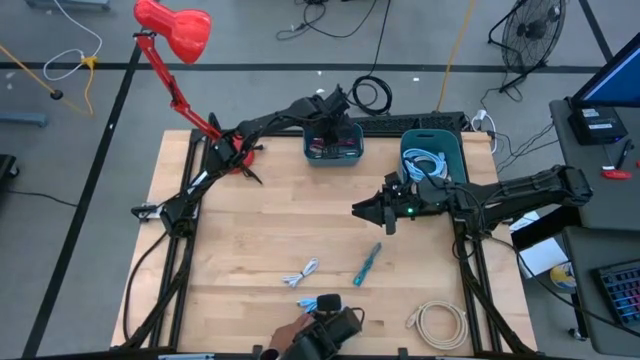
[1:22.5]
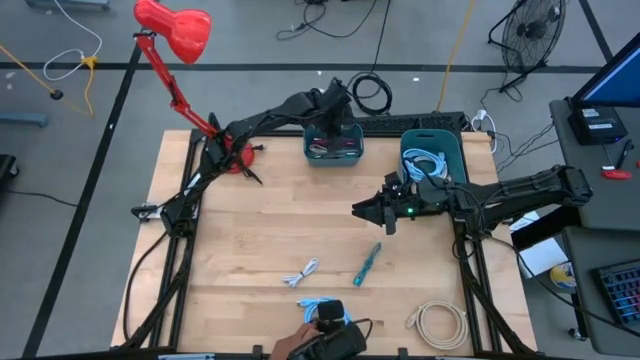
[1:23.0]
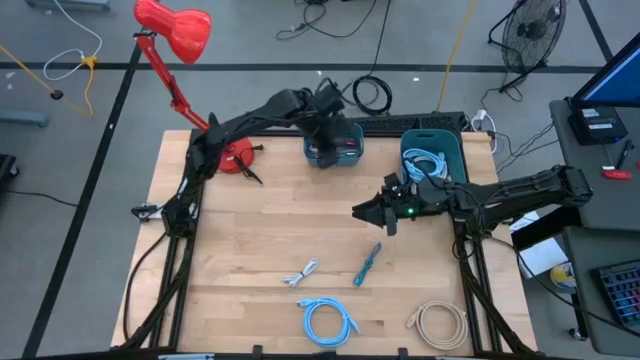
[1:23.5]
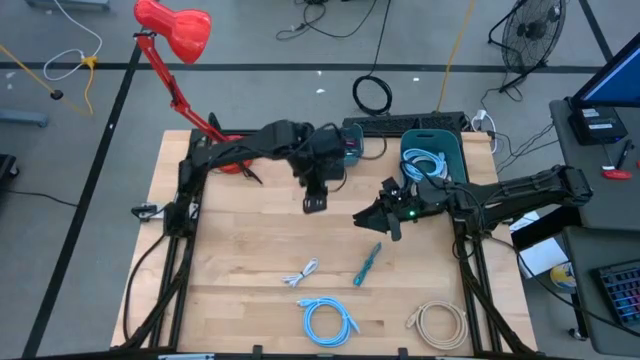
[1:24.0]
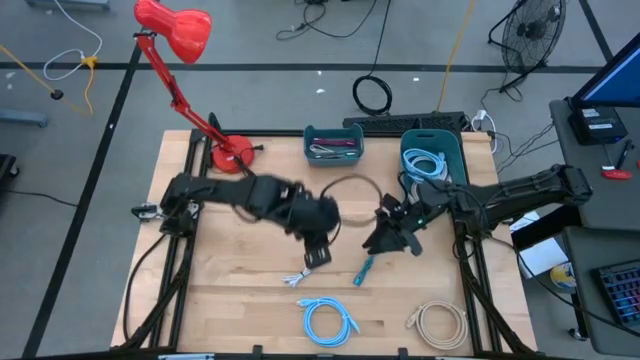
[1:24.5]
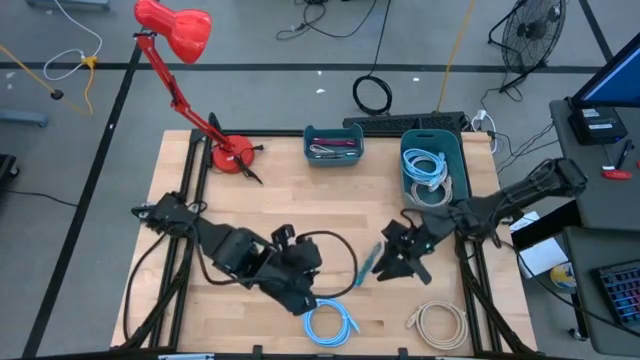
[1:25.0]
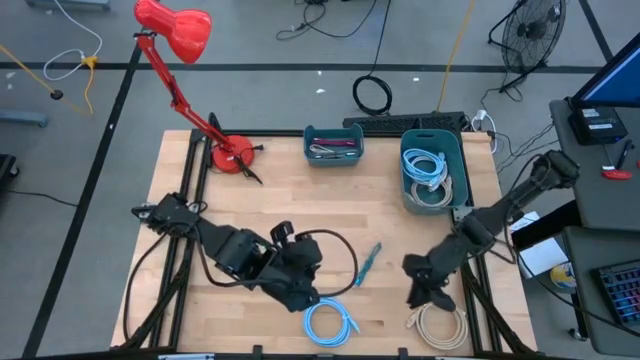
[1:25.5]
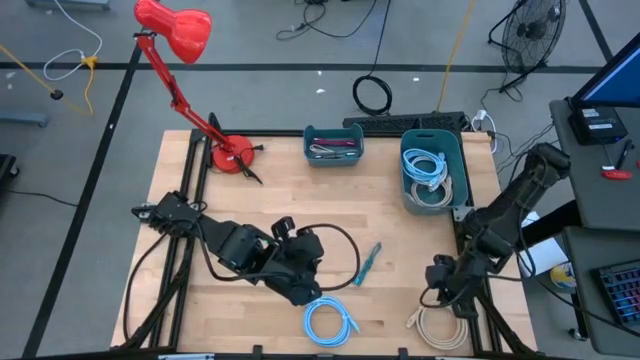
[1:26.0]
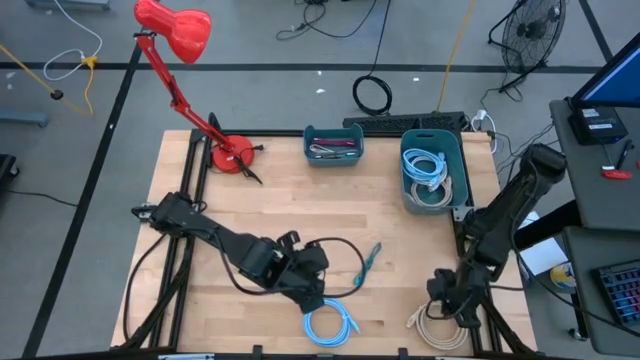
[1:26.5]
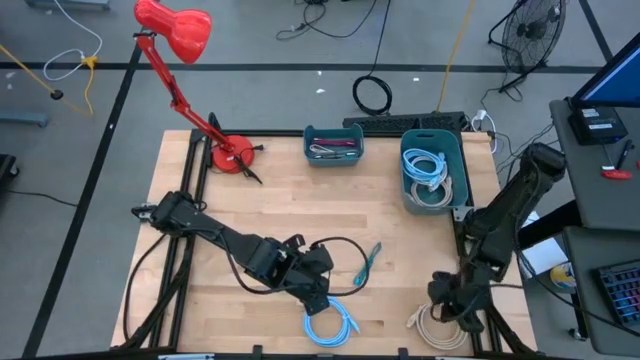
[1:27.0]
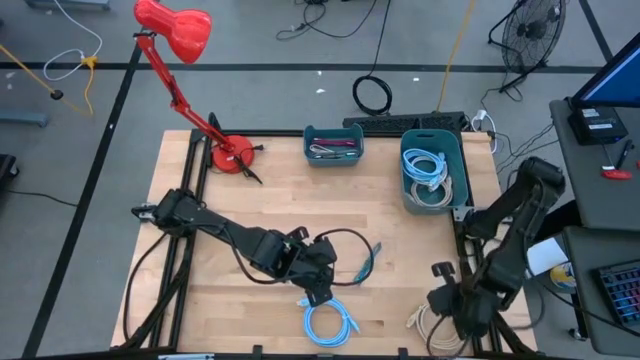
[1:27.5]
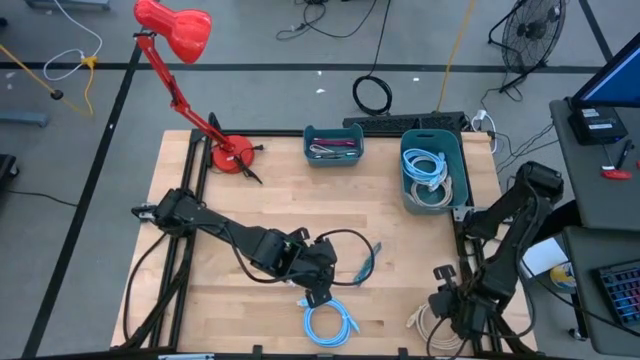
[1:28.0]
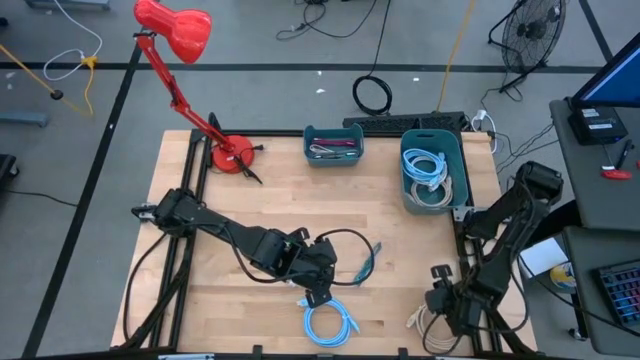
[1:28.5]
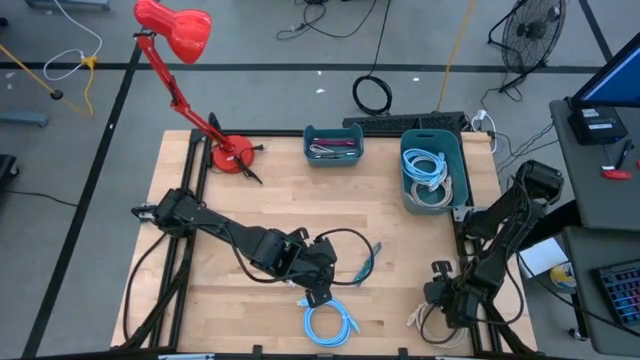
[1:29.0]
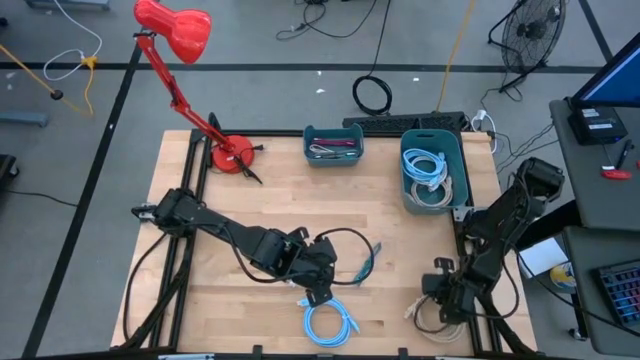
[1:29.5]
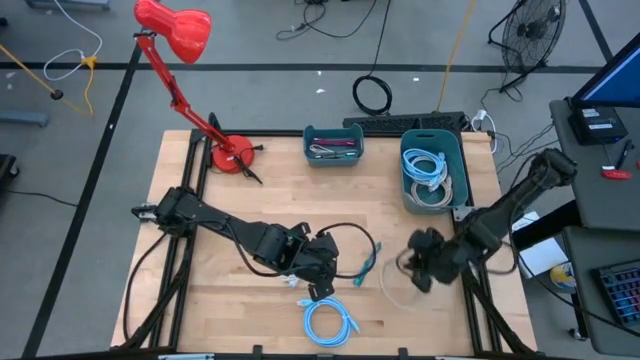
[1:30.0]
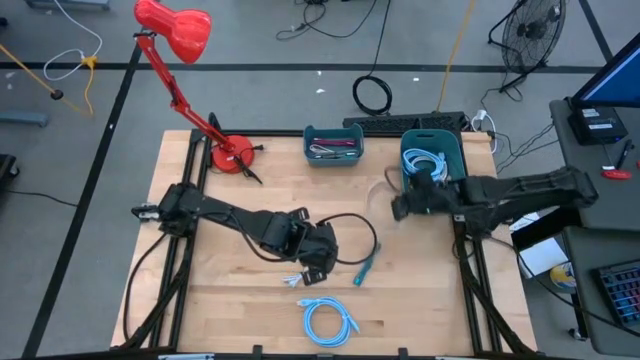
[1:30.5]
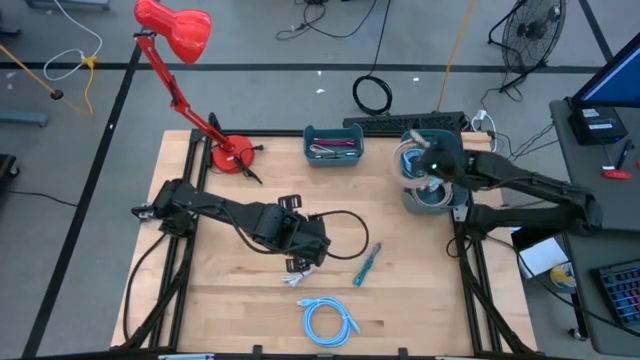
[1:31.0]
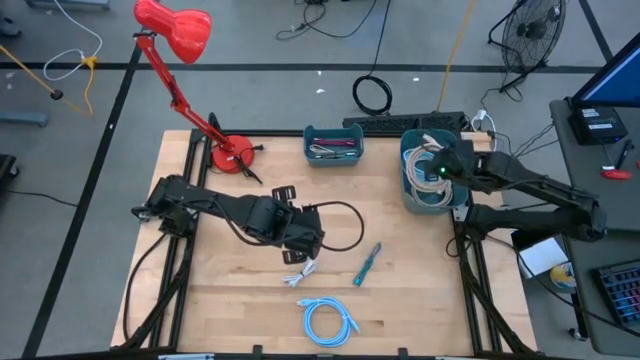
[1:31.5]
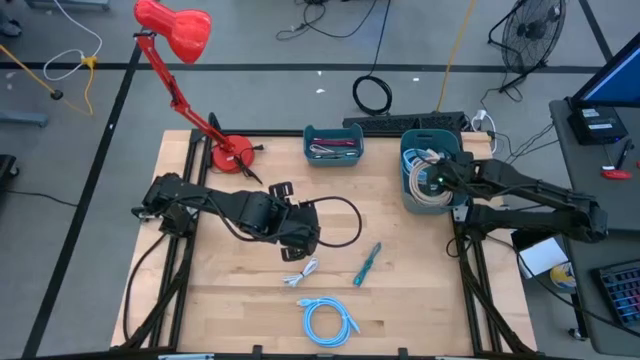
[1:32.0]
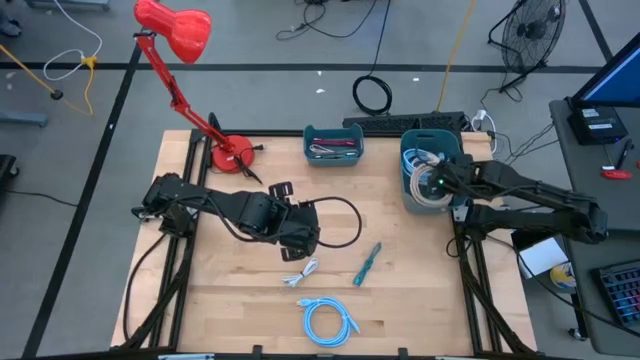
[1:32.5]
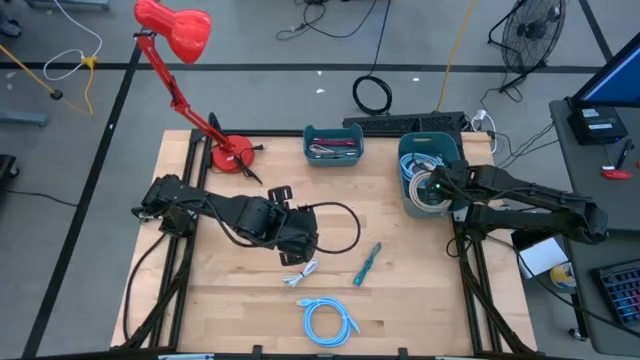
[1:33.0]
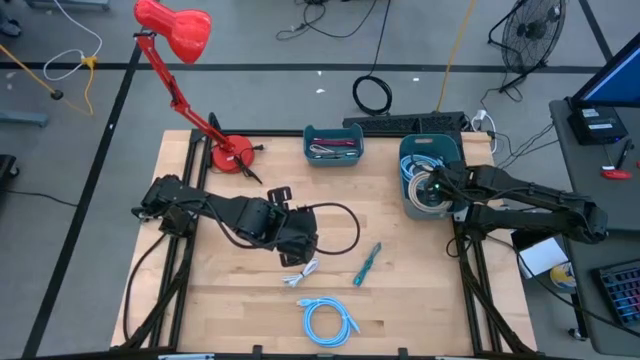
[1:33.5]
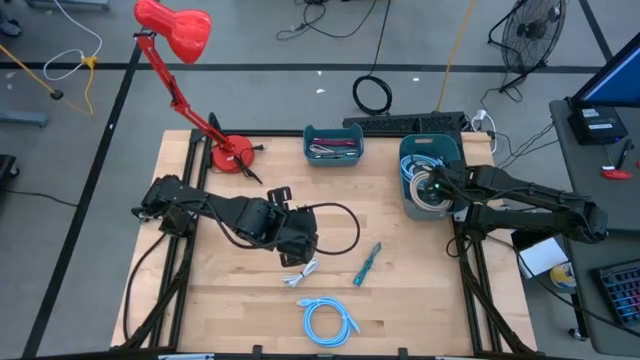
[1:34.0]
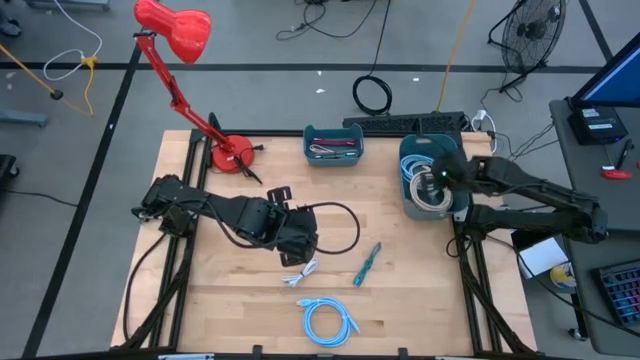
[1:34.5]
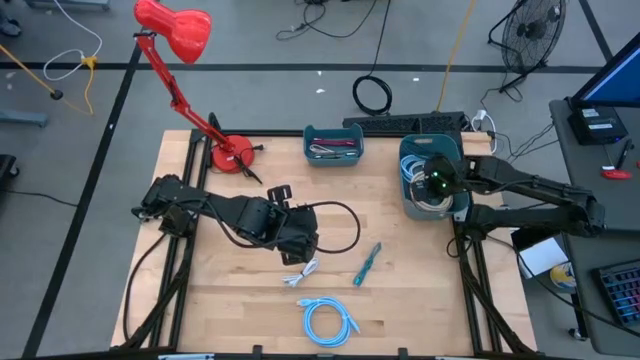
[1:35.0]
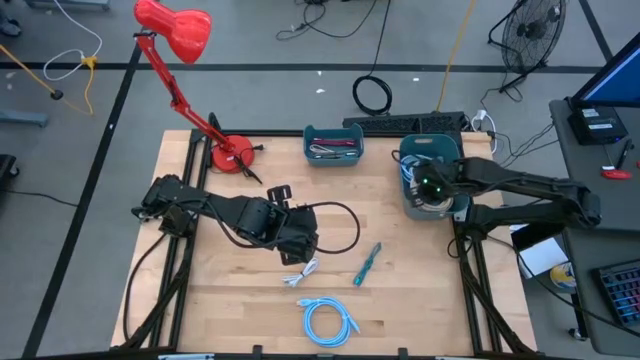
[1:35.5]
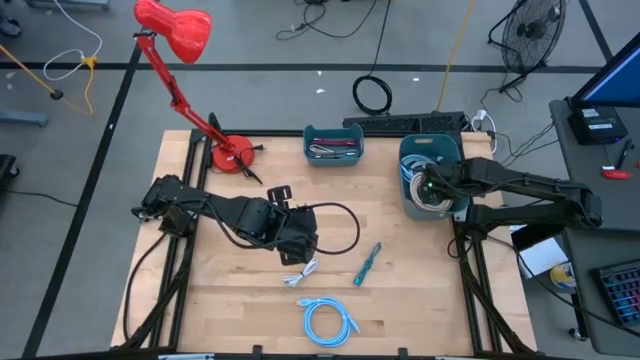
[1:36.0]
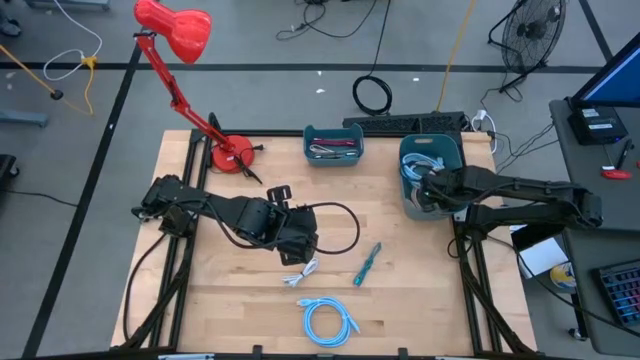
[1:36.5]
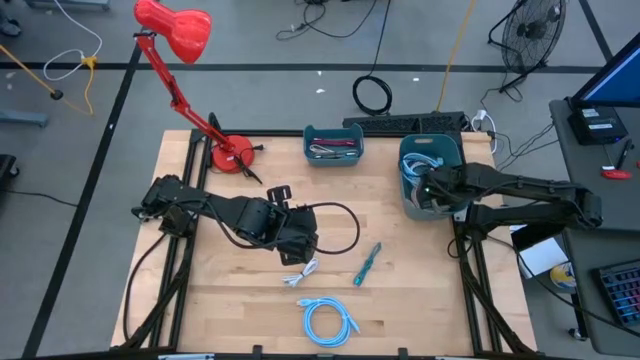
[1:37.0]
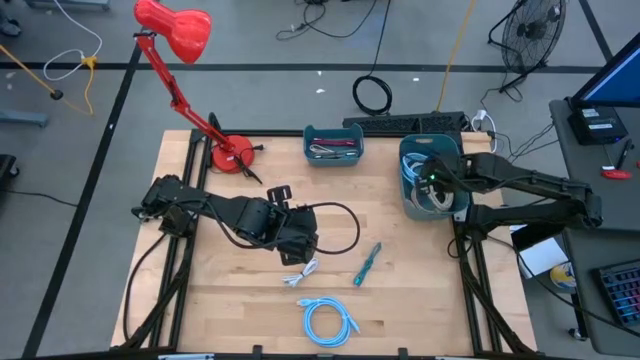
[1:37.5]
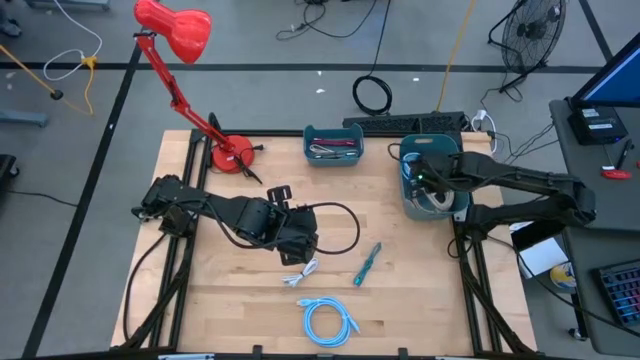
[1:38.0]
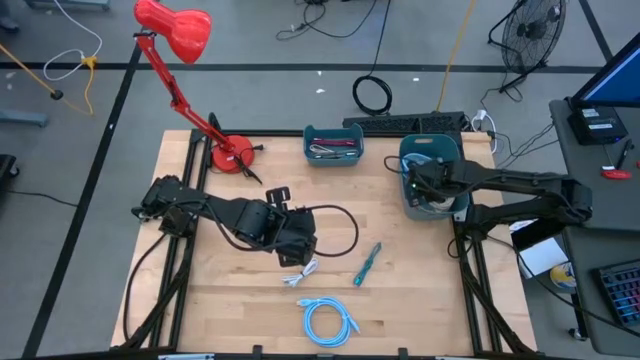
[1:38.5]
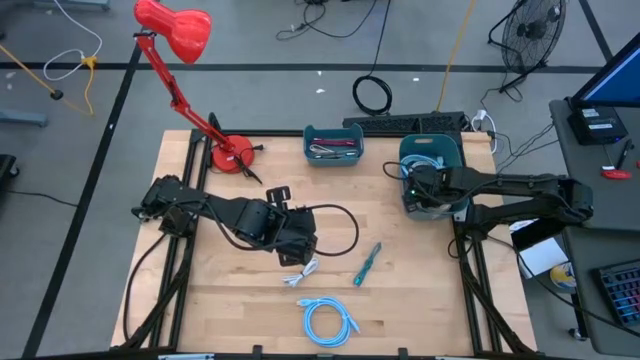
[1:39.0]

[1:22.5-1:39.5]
Task: Pick & Place USB Port
Put the brown HDMI cable into the right blue bin

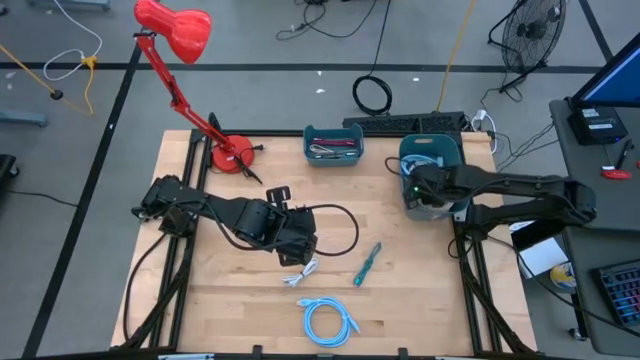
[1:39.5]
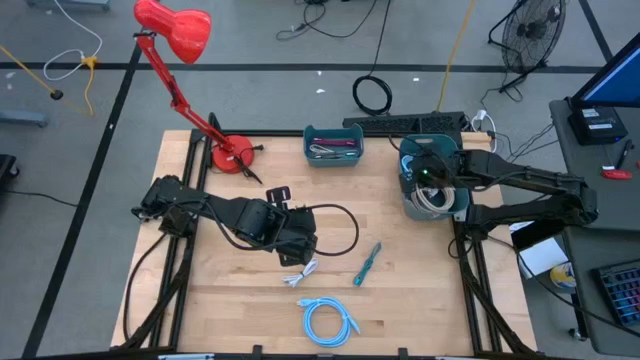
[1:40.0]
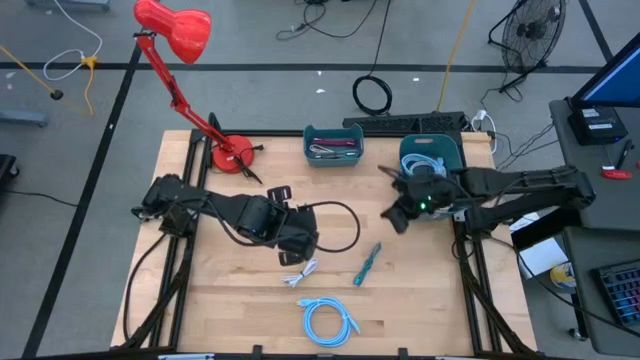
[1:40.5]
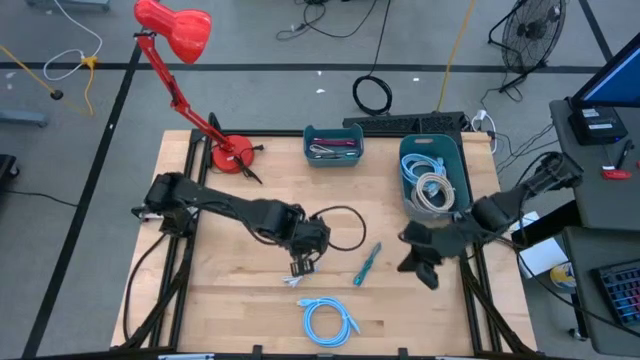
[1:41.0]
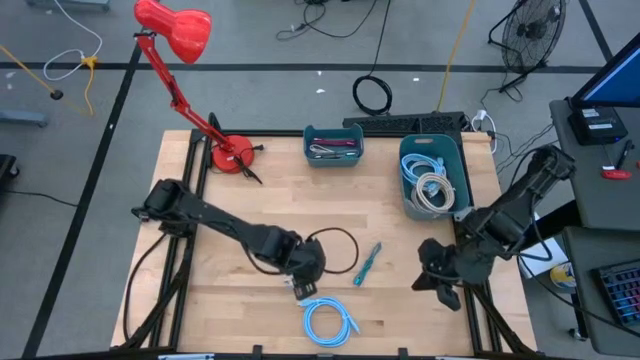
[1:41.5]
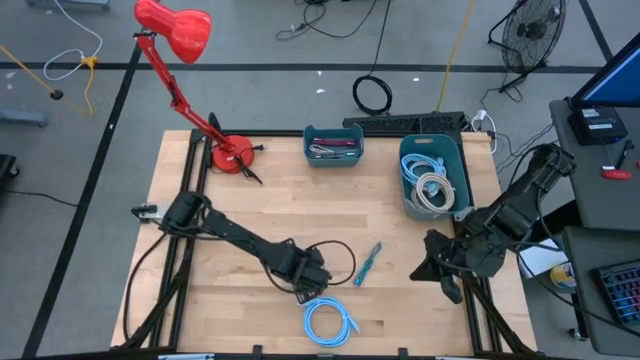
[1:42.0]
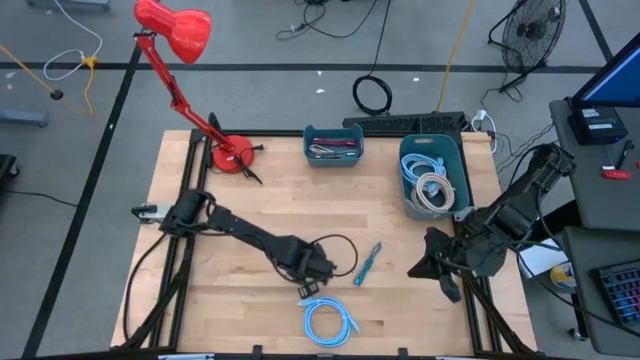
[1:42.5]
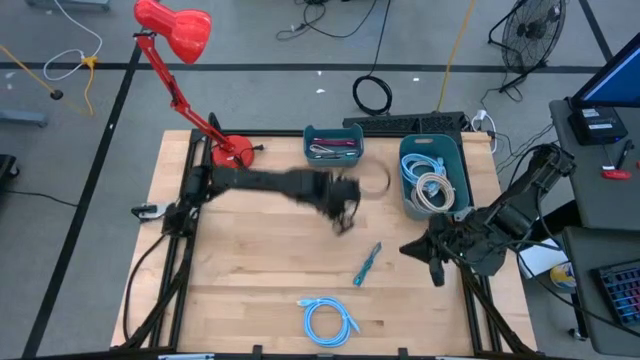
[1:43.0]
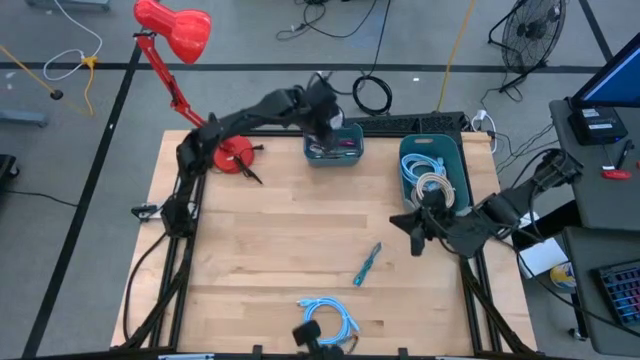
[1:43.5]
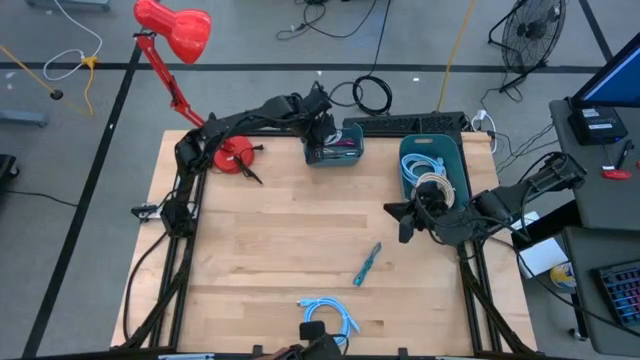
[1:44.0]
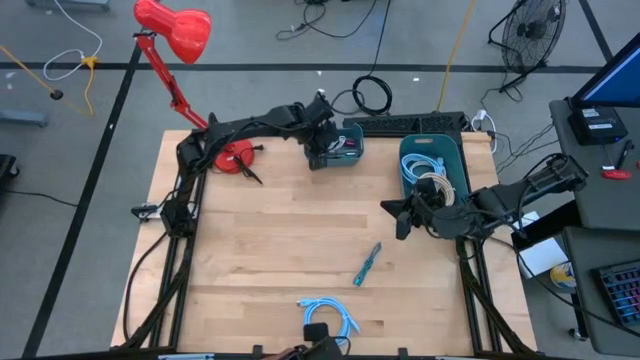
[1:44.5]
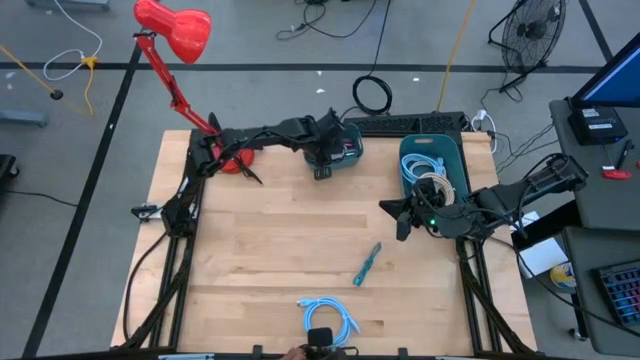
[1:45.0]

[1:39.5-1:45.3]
Put the white charger cable into the left blue bin
